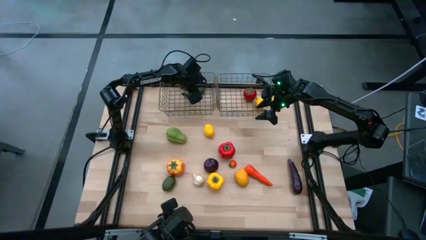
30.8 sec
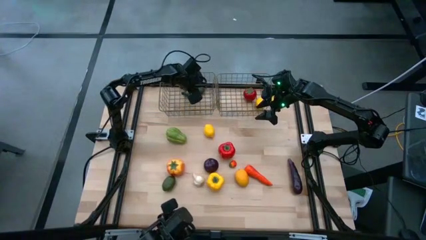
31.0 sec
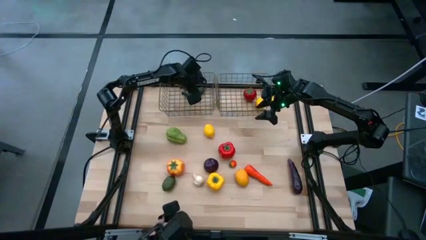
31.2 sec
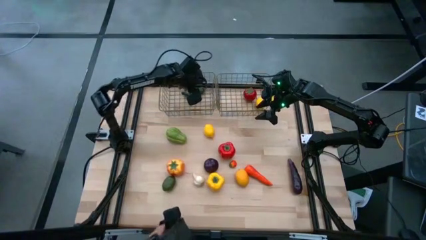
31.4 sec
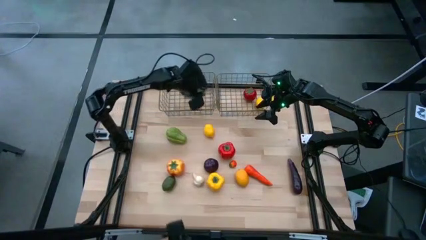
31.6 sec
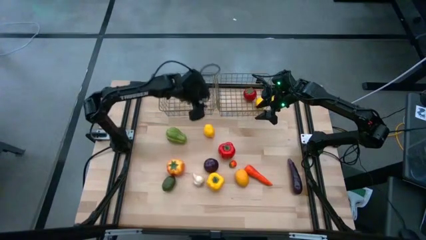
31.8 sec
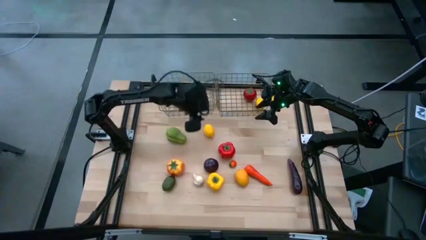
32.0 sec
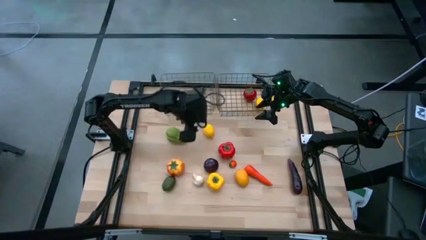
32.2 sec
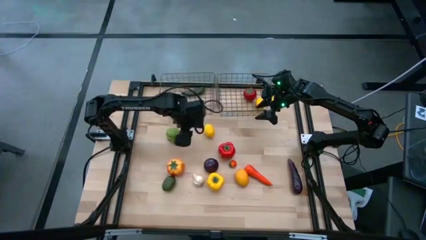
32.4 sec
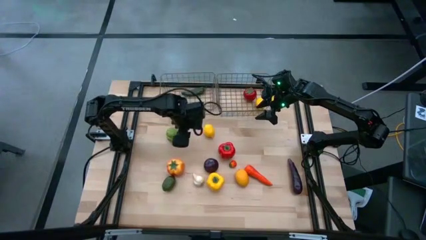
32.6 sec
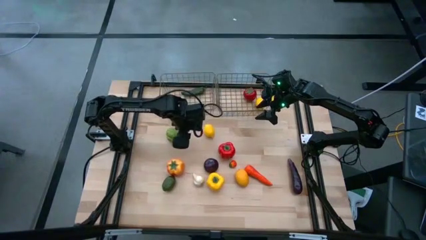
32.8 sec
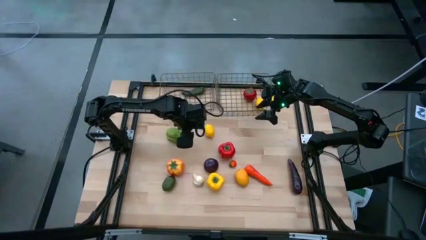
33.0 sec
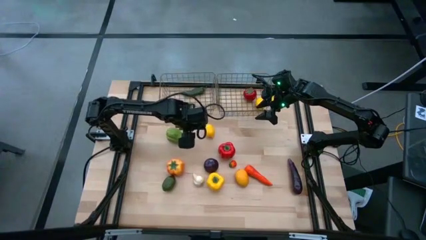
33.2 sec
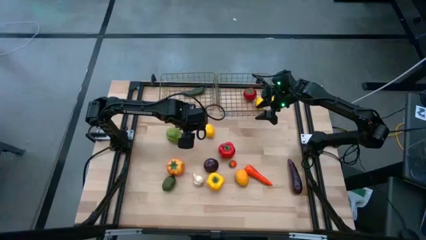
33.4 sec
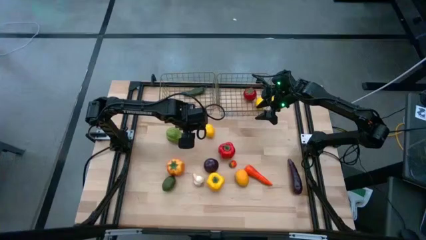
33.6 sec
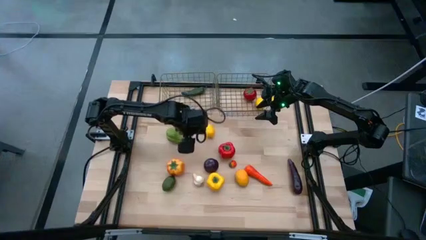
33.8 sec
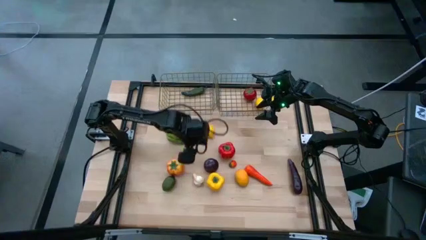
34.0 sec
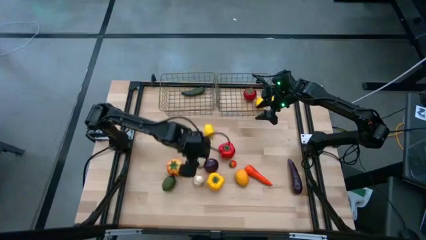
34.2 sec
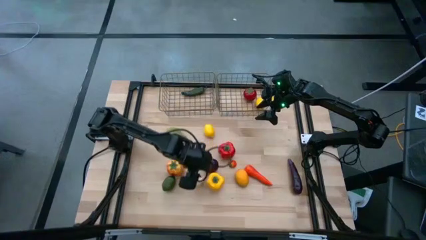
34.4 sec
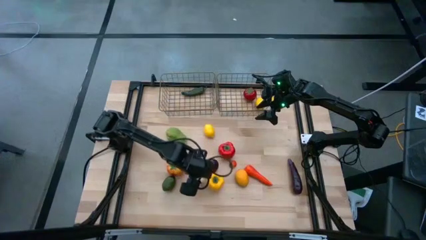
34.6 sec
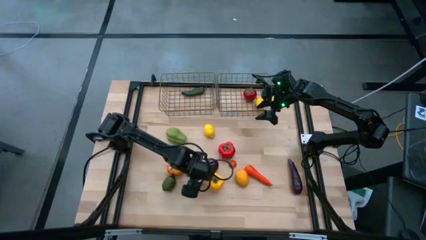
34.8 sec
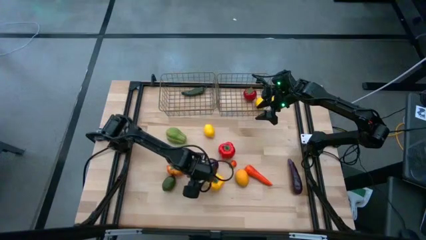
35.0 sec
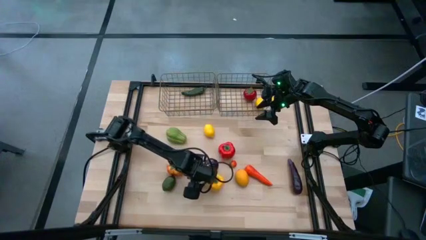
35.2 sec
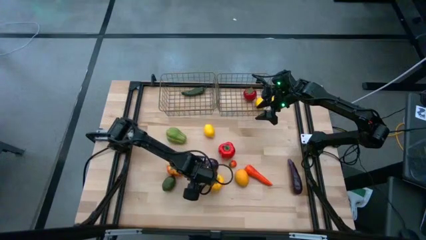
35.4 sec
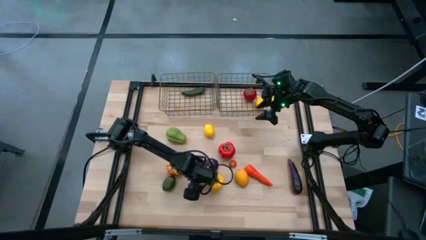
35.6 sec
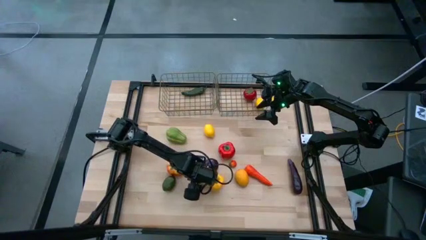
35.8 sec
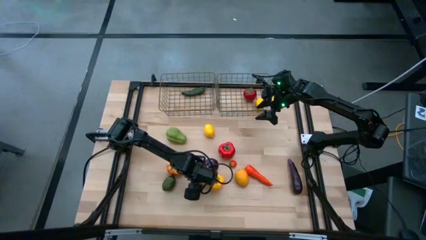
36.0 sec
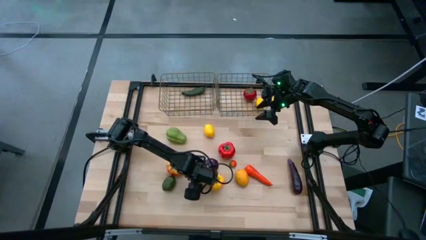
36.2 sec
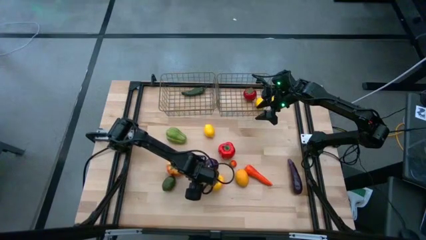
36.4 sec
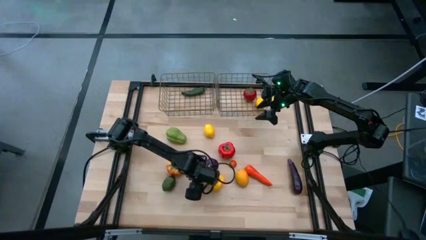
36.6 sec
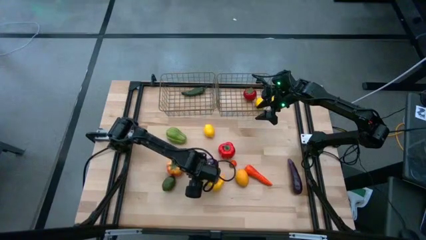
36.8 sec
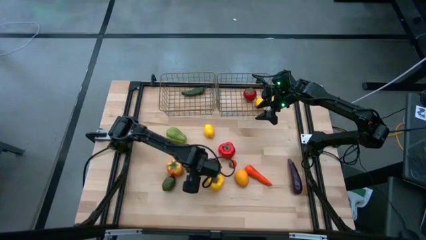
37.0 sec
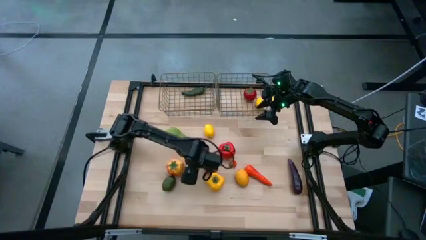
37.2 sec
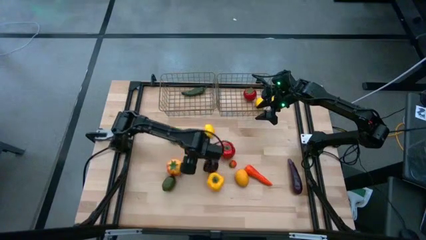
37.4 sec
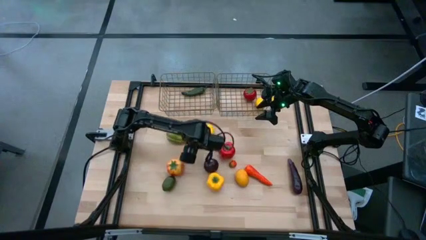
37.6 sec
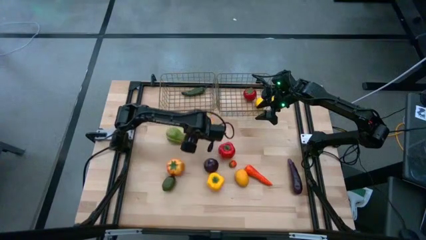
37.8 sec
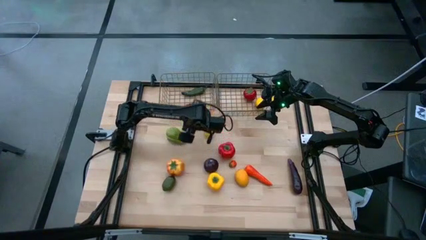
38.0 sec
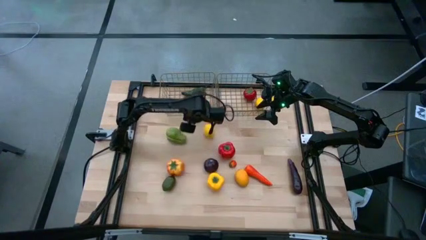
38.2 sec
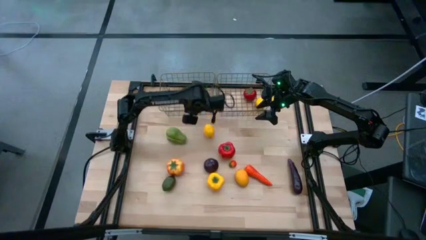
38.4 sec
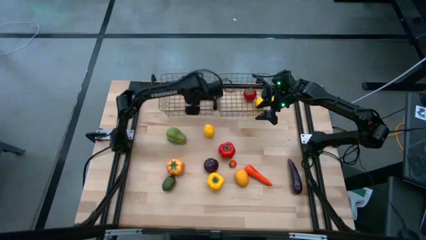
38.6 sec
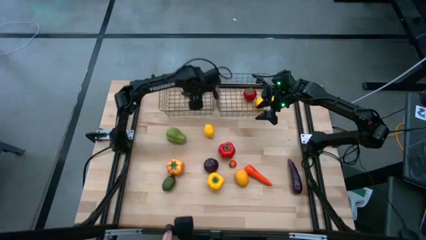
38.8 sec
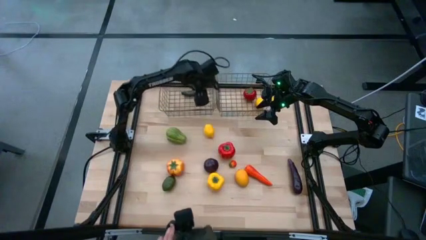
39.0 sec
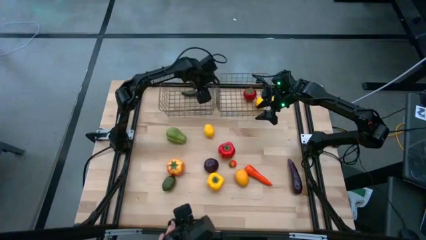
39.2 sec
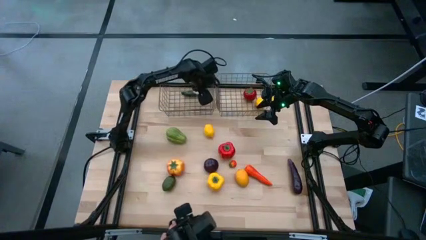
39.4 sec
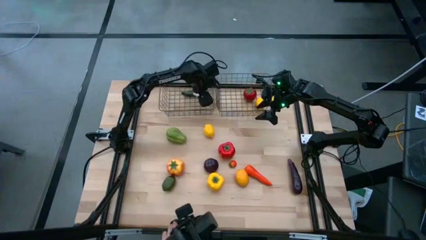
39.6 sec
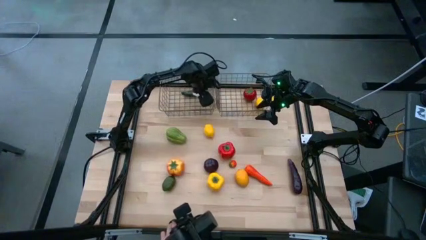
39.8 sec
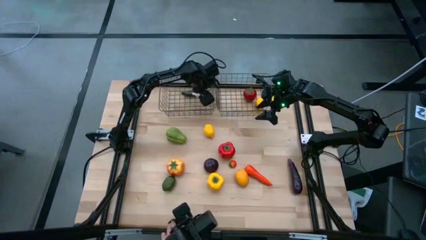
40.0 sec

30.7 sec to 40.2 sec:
Task: Sort produce into baskets
Put the white garlic into the left golden wire basket

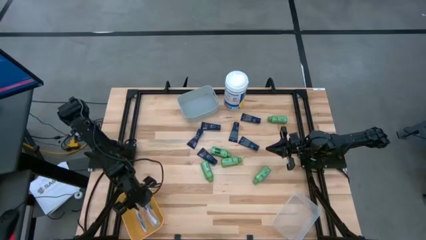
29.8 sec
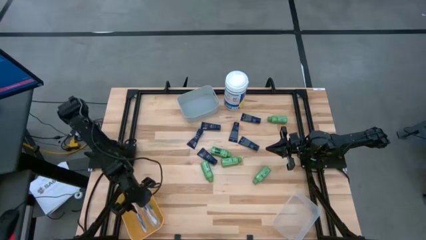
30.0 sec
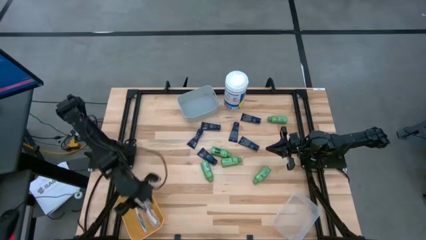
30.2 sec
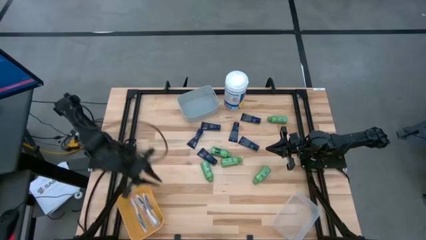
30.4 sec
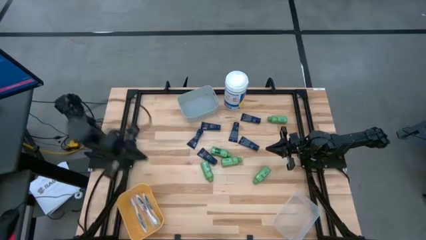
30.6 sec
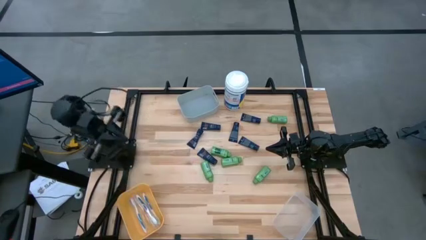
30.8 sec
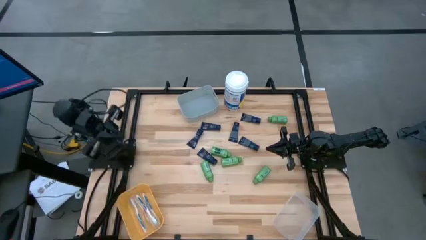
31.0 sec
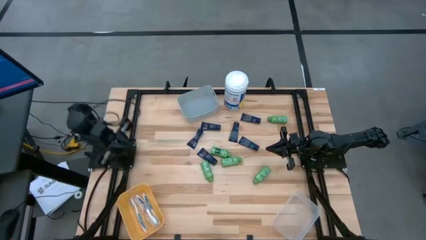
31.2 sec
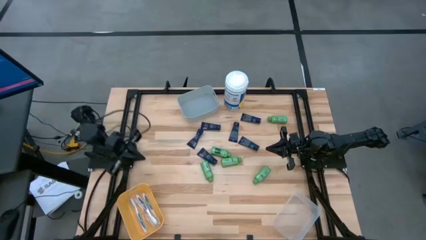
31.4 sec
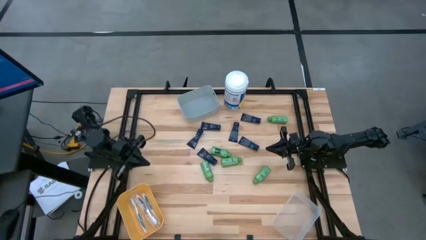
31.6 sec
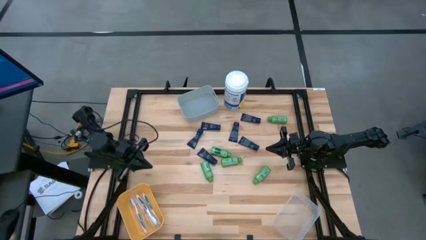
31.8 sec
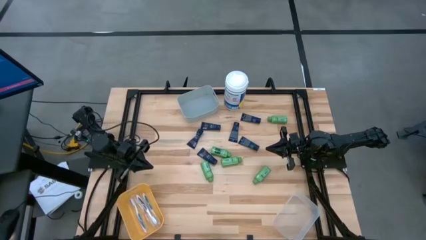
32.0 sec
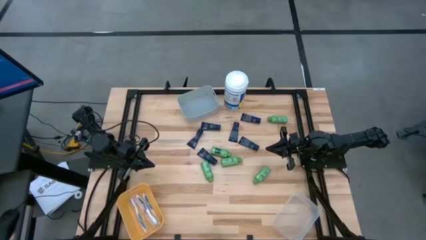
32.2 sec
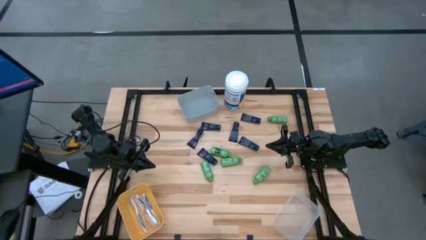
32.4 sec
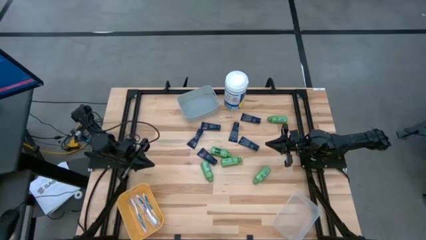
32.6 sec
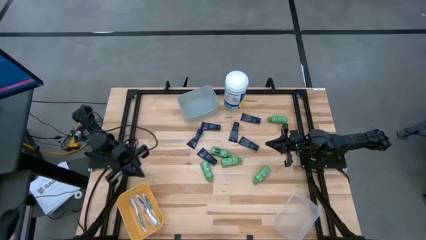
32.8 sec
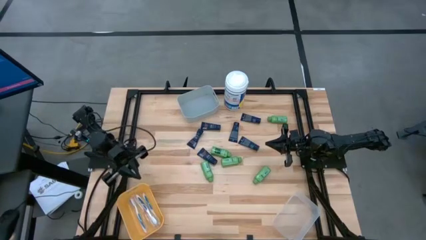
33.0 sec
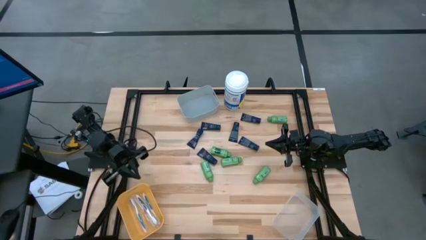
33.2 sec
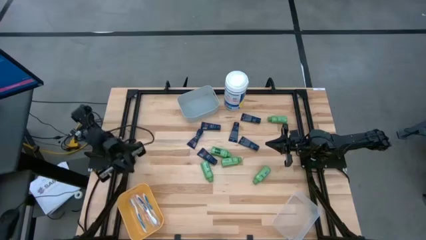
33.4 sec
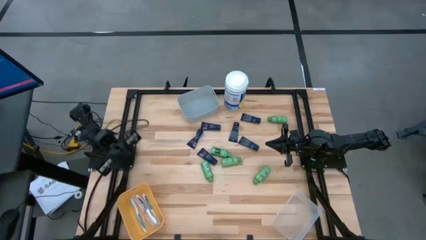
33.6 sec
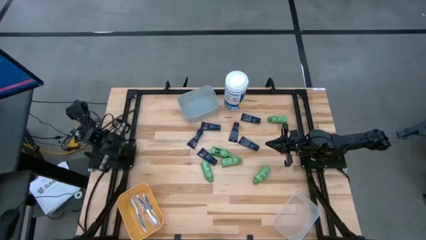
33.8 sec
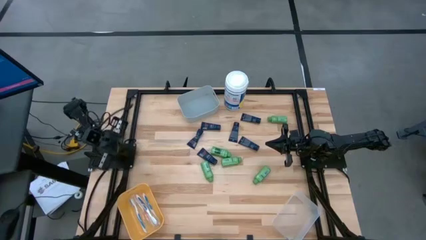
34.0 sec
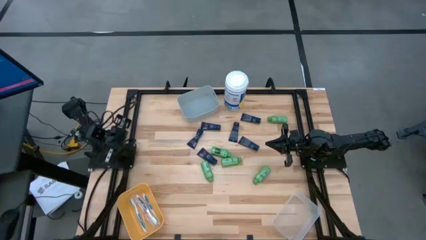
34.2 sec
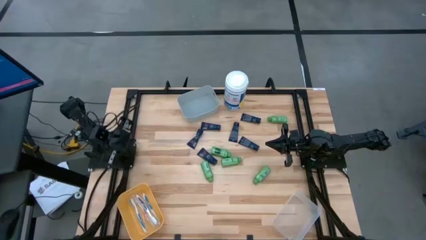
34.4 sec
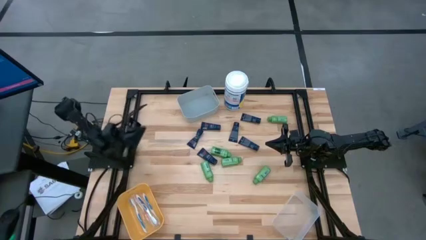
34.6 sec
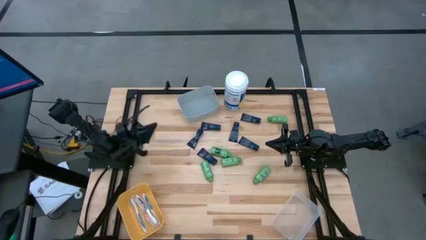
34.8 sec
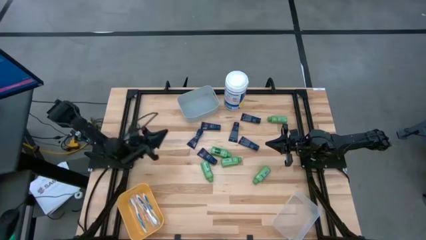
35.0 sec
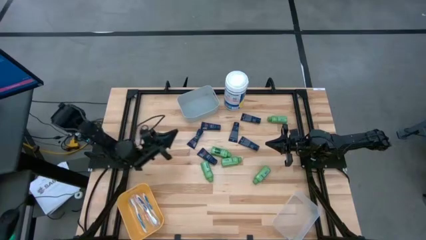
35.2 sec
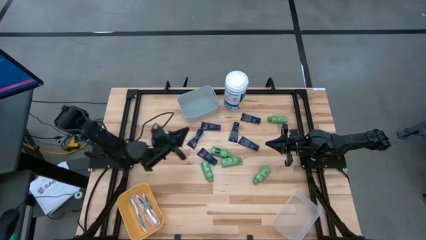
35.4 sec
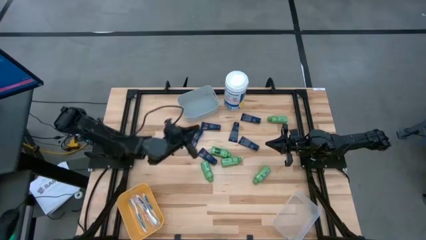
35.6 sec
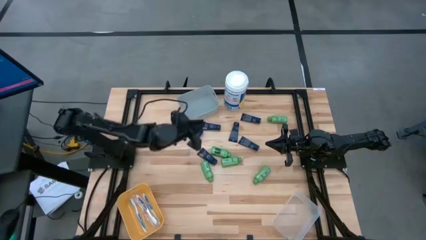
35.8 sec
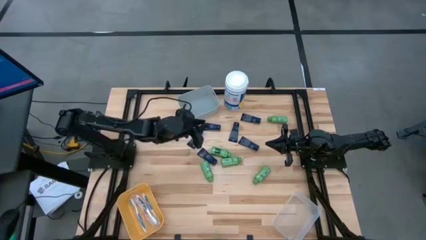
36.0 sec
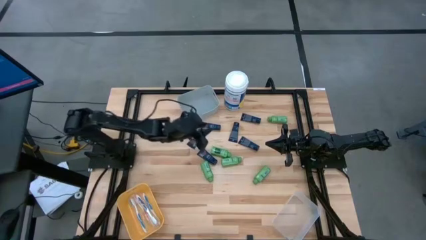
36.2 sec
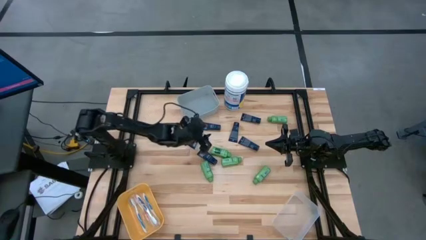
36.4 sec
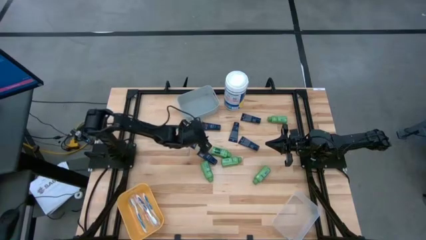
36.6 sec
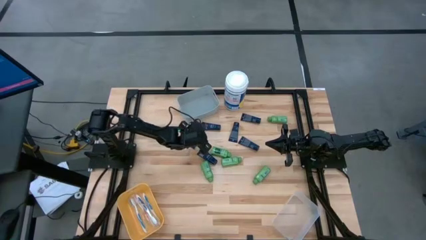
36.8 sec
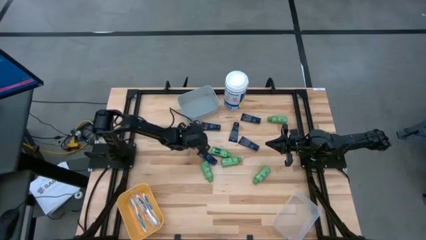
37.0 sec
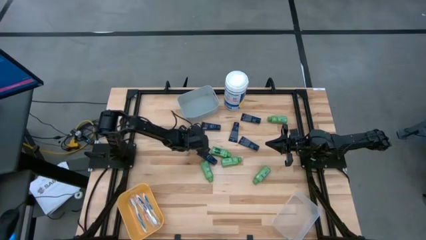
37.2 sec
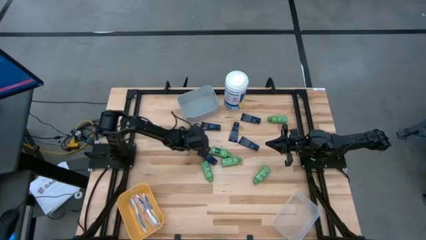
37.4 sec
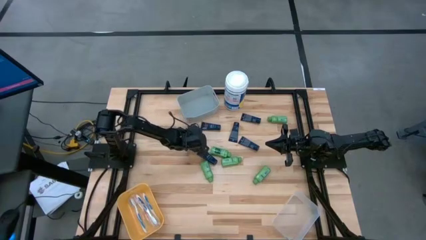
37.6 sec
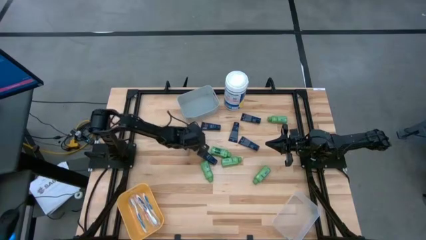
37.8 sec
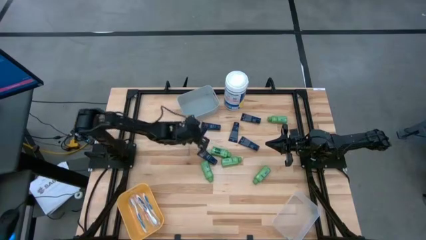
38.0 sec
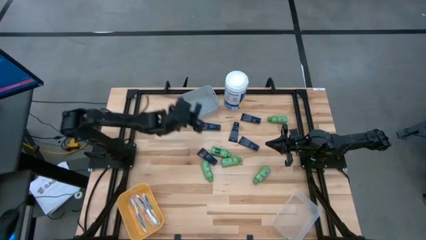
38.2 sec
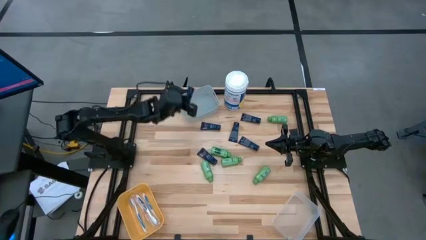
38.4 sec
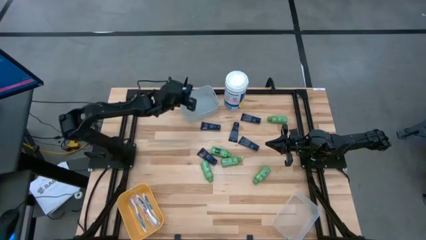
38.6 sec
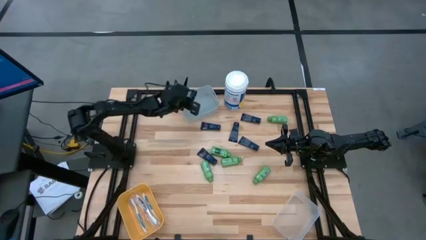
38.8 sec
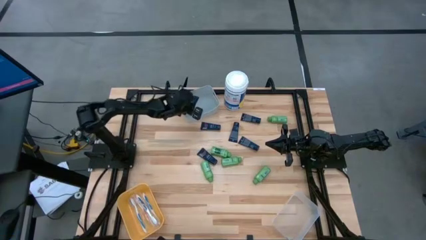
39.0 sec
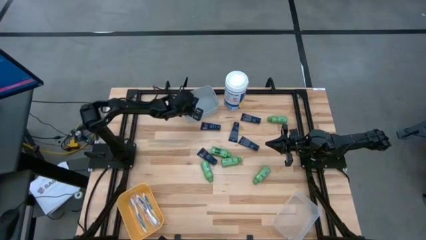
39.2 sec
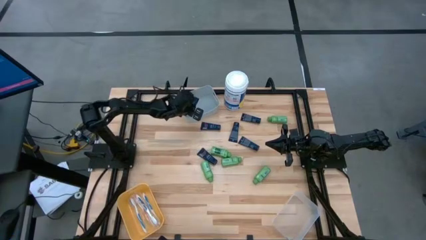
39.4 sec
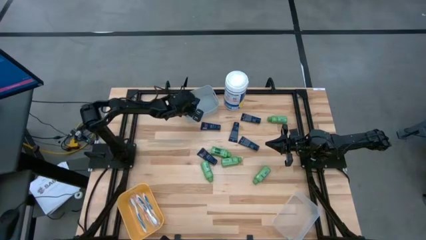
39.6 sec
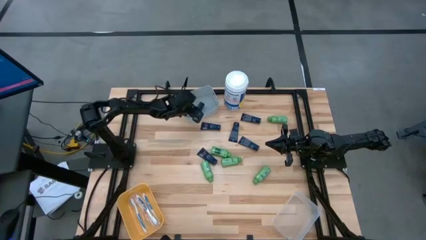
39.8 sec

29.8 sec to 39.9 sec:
Task: Pick & Place Travel size toiletries
Put the dark blue shave cream into the gray bin
